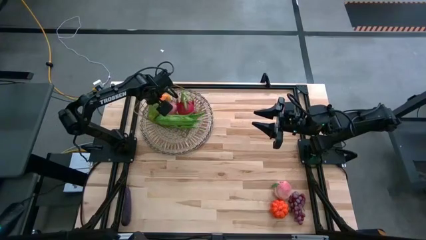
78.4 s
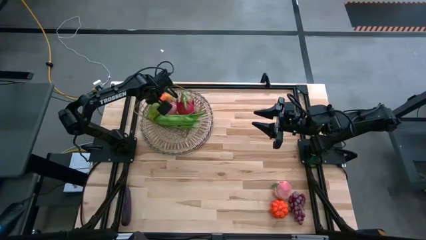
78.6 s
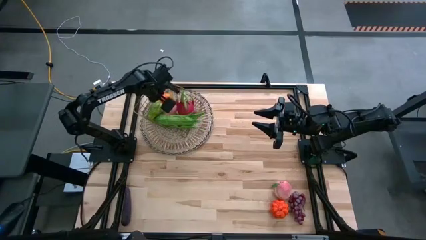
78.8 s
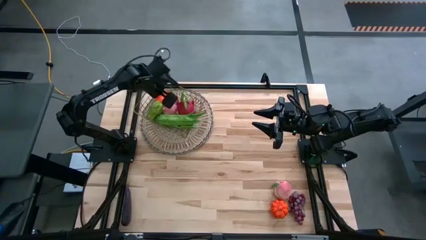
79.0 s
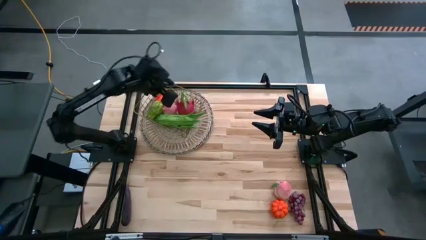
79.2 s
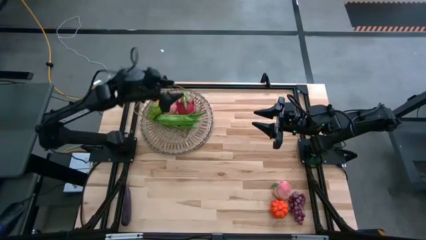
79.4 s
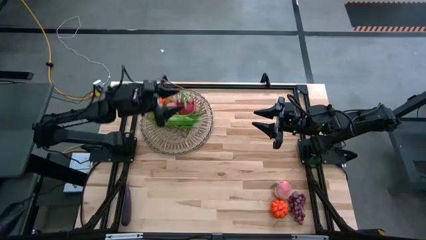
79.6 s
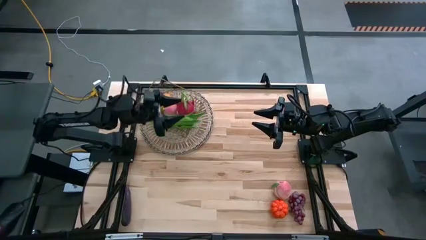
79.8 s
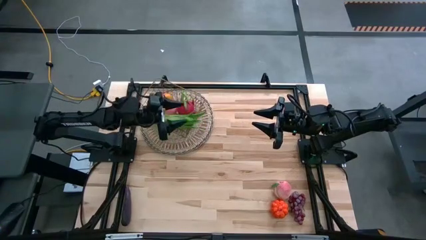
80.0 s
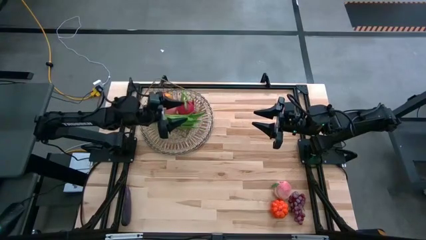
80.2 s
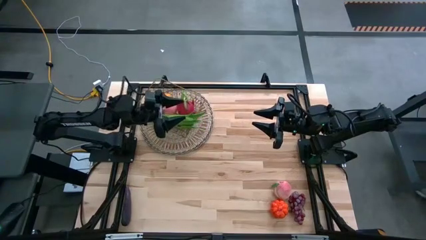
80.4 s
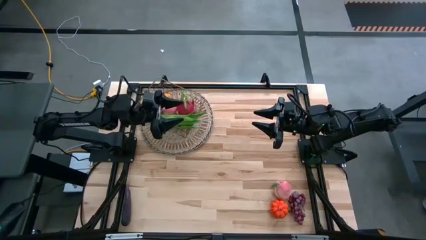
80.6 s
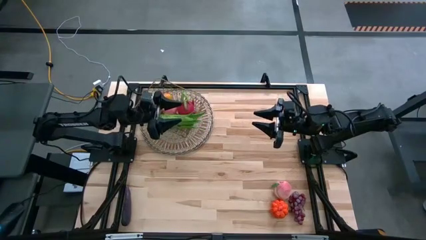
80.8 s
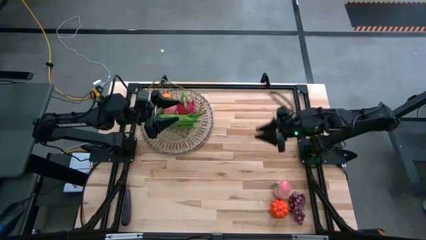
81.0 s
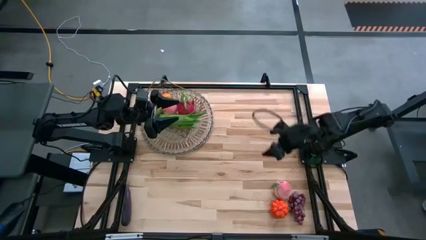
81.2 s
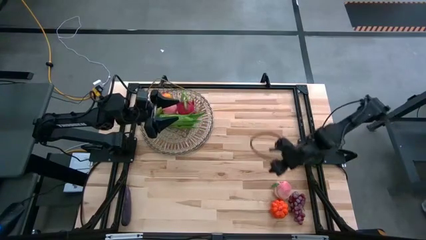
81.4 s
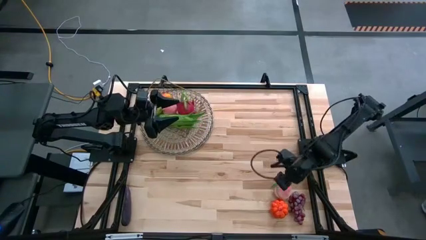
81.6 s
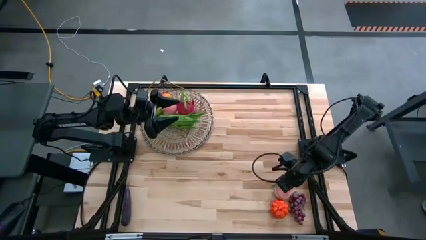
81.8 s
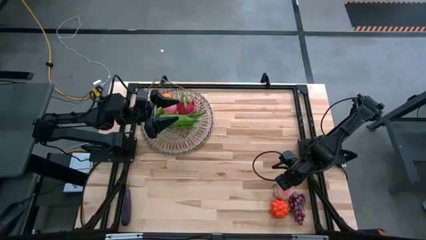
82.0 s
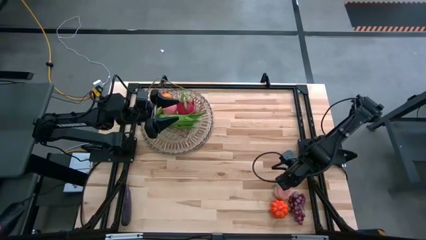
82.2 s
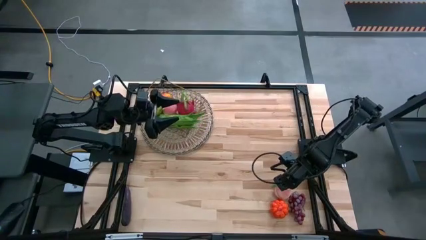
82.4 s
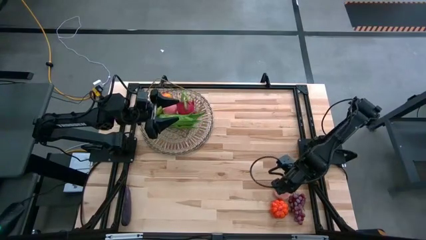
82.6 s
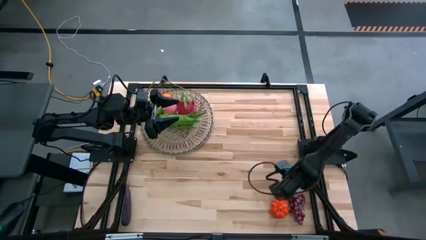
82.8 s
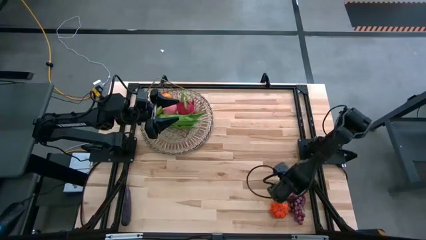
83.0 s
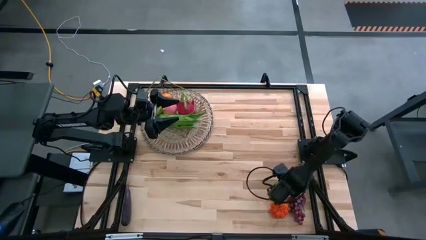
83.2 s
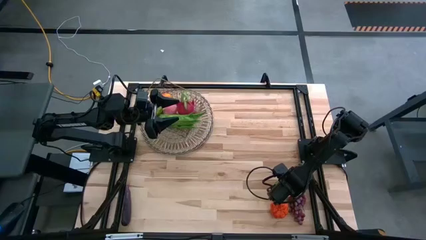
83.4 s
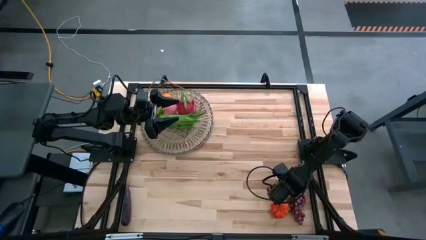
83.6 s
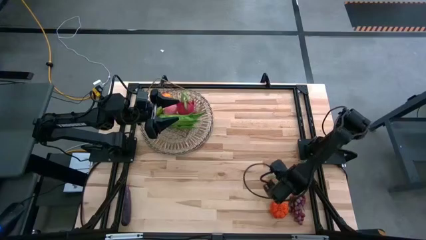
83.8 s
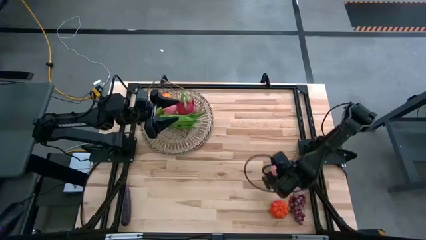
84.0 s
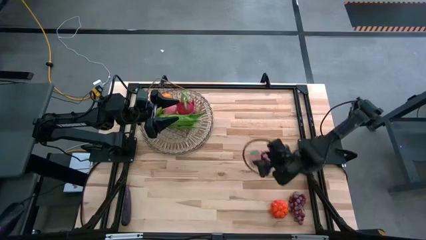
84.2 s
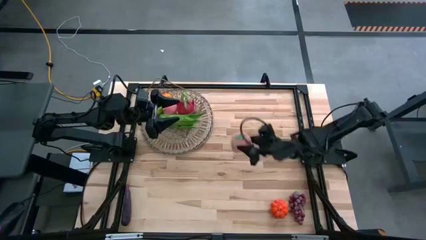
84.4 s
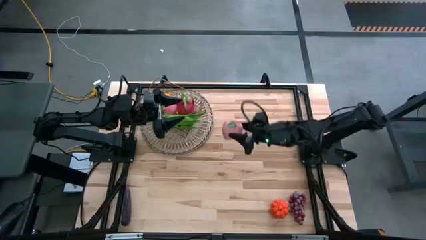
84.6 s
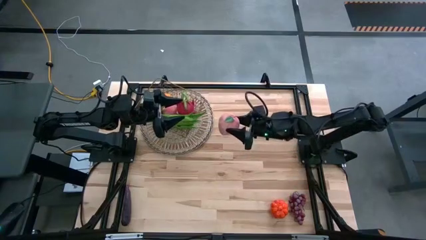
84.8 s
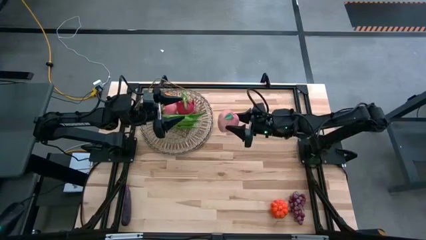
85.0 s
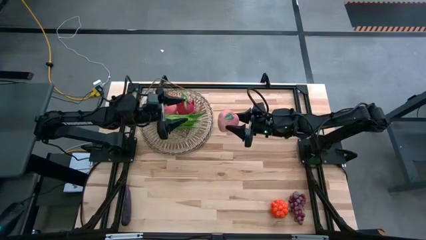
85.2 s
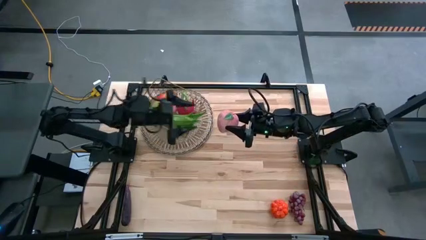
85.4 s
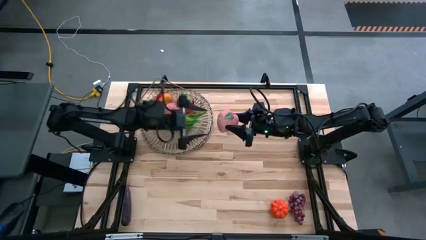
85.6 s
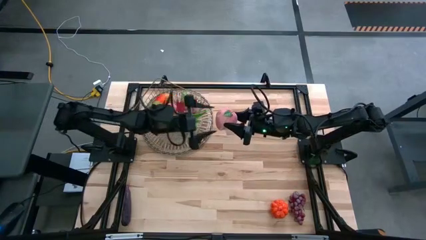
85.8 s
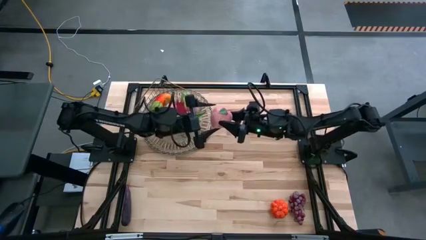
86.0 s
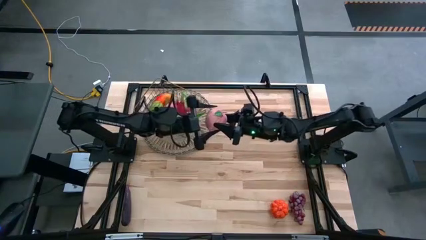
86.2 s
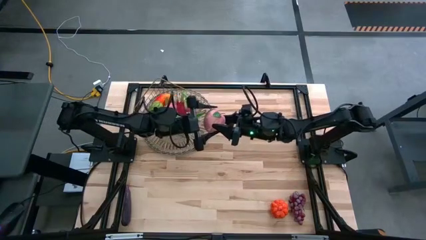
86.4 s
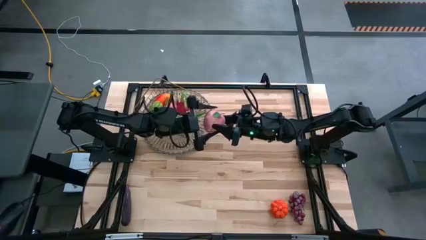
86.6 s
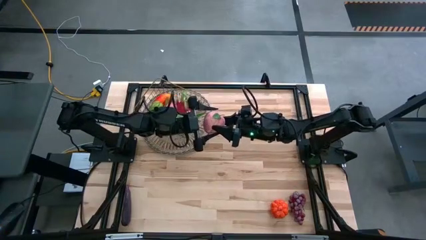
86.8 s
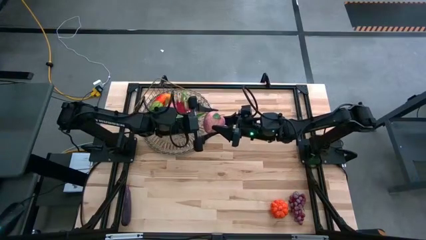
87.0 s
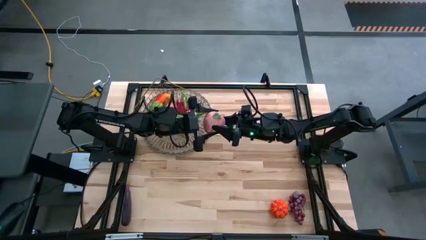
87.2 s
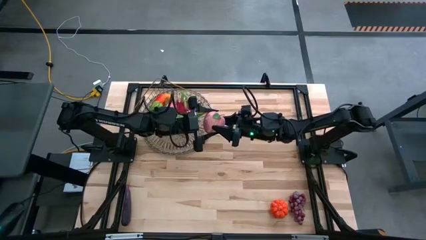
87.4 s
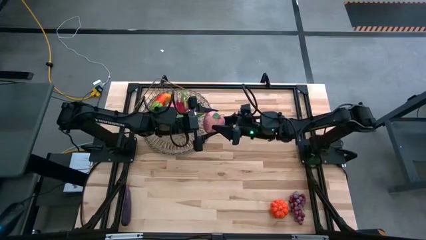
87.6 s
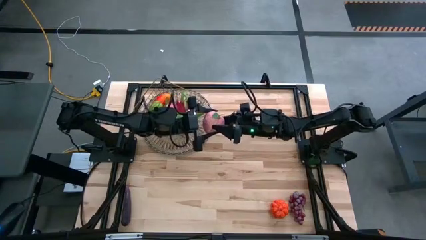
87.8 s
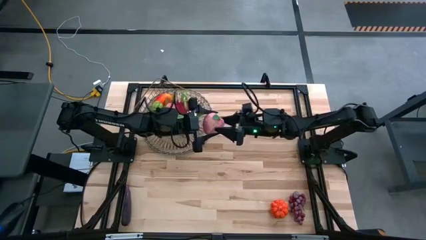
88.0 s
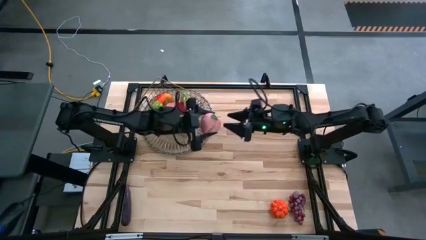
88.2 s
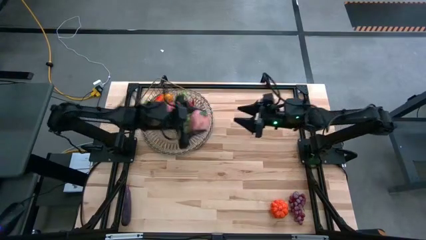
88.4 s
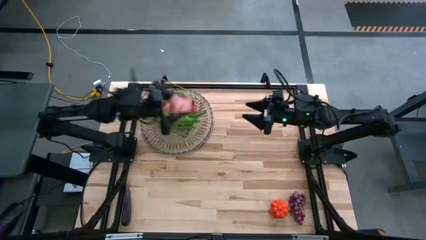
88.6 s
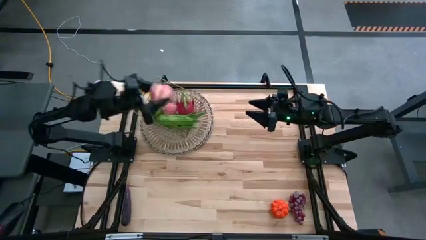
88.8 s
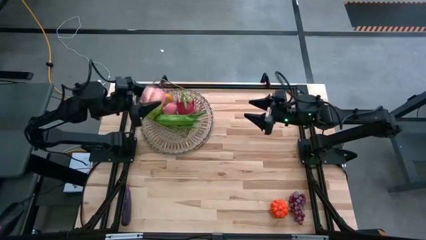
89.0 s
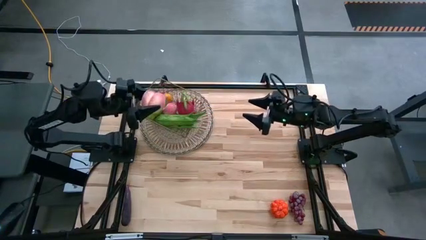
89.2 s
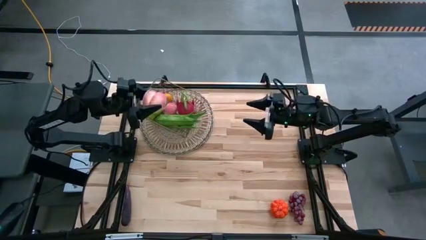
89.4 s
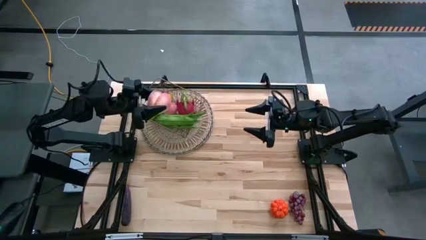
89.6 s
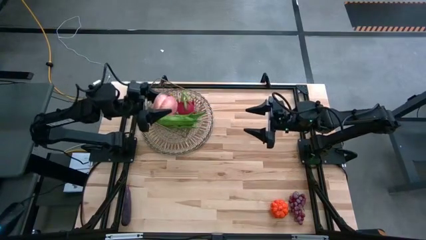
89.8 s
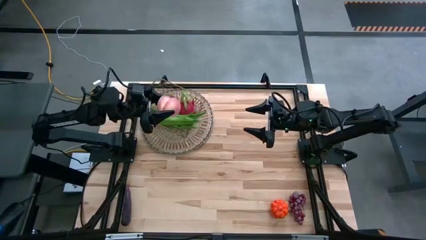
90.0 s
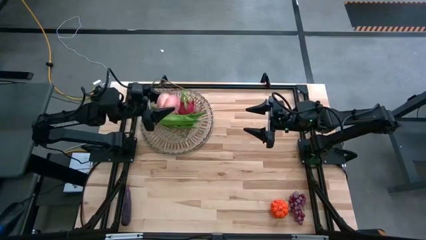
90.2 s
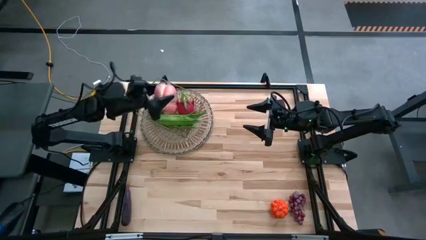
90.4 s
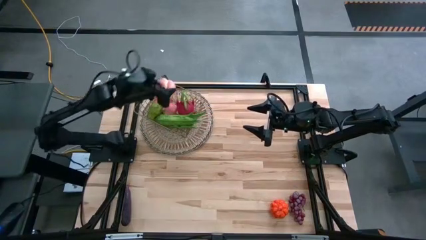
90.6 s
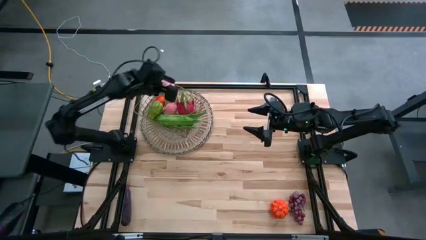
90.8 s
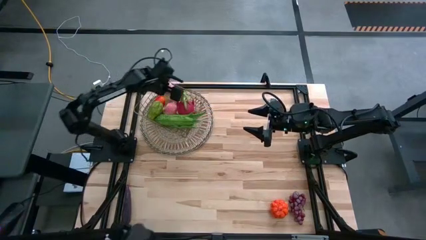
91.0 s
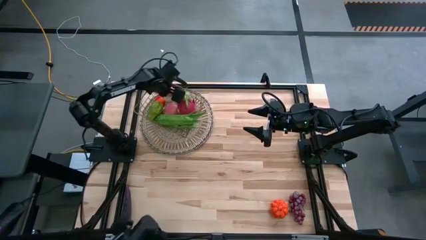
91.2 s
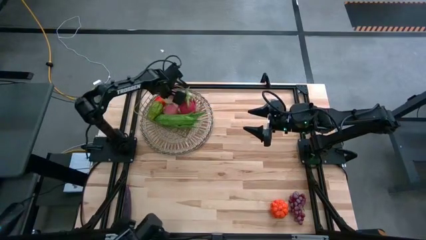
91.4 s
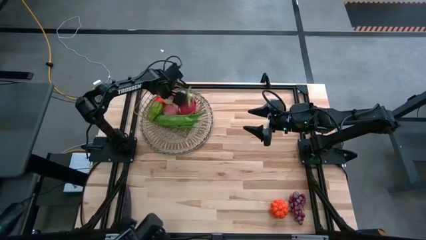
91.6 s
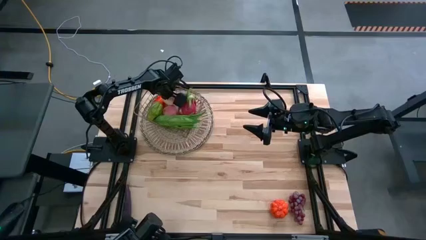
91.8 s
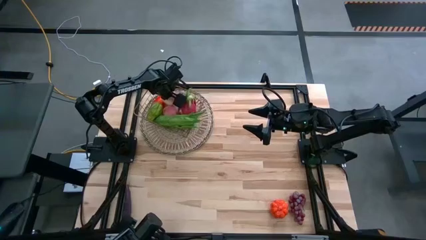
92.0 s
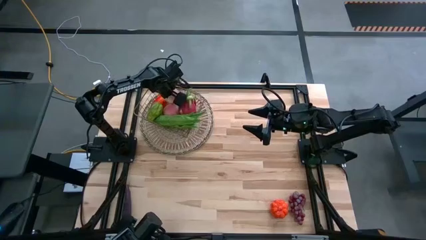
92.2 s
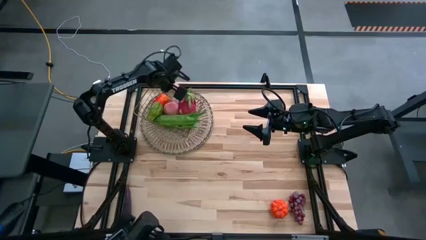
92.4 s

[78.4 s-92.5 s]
Task: Build produce basket
Put the peach into the wire basket

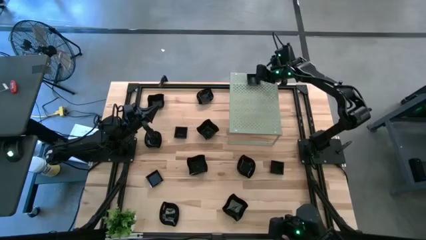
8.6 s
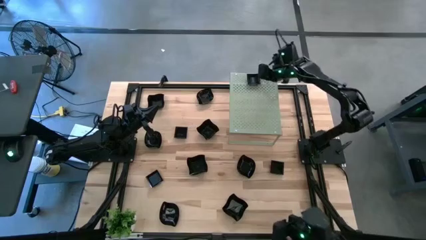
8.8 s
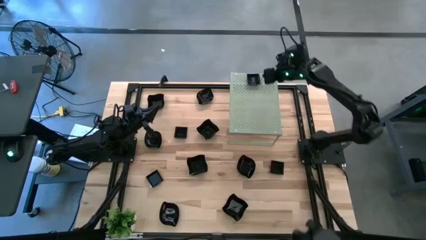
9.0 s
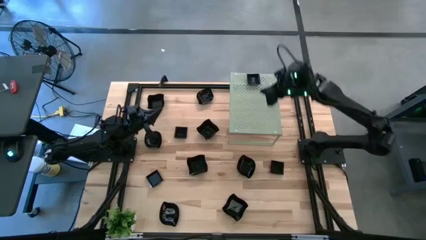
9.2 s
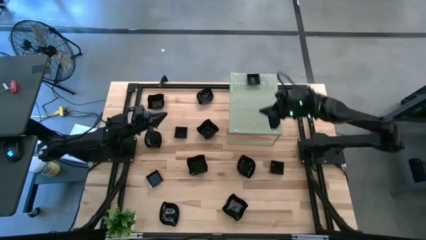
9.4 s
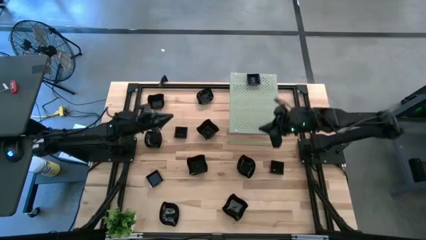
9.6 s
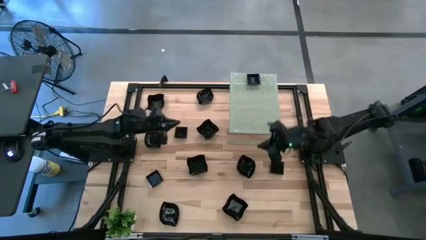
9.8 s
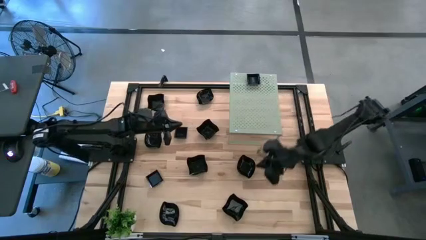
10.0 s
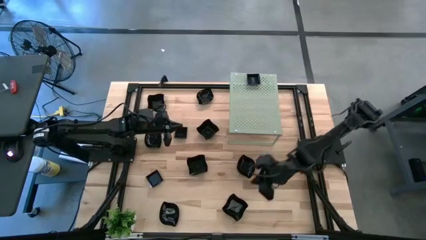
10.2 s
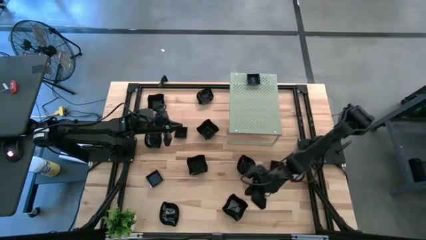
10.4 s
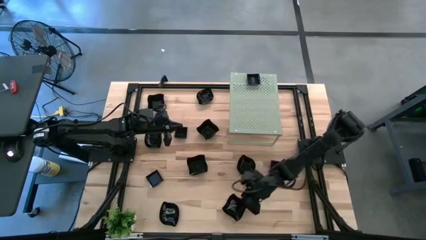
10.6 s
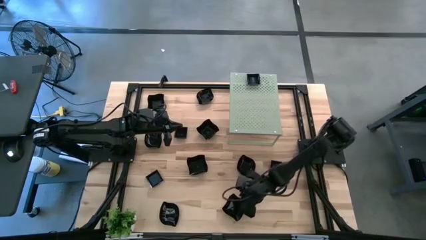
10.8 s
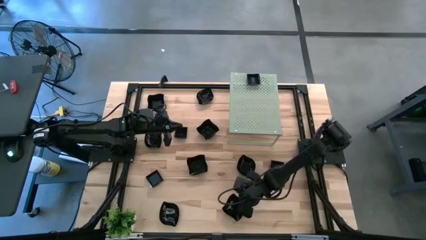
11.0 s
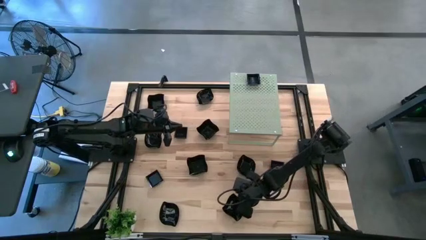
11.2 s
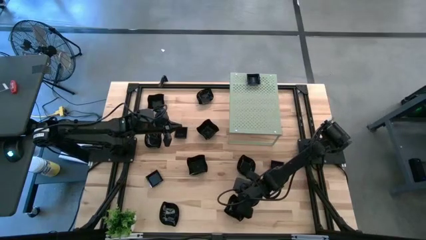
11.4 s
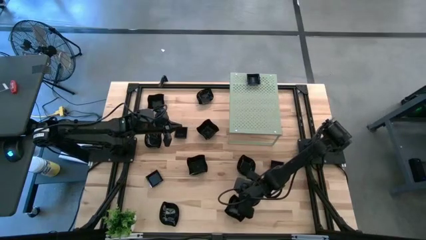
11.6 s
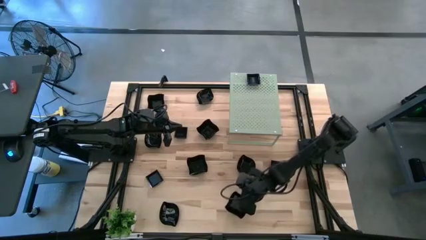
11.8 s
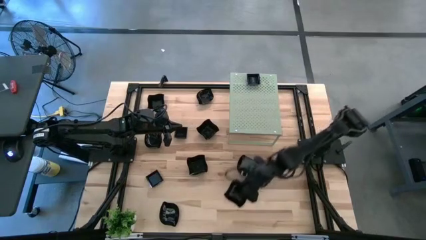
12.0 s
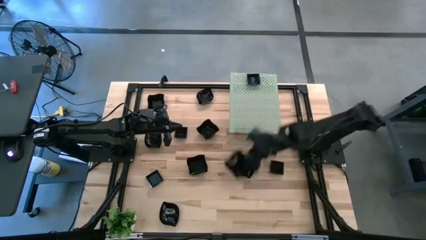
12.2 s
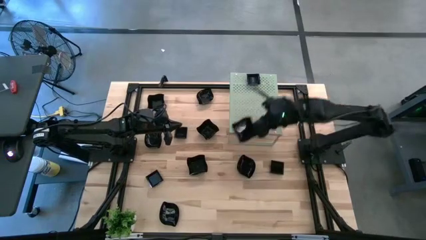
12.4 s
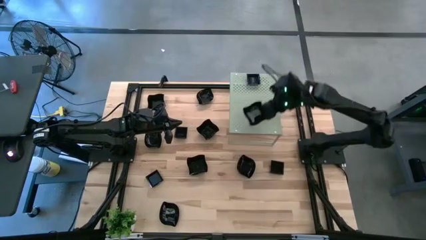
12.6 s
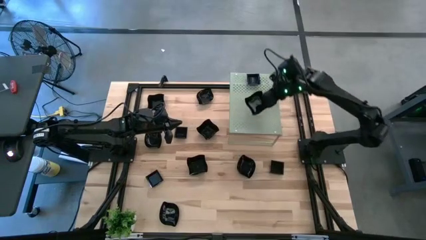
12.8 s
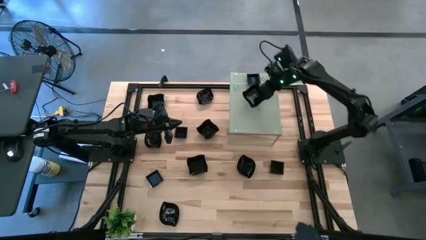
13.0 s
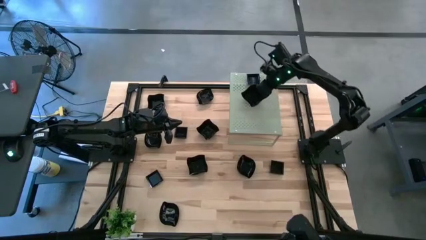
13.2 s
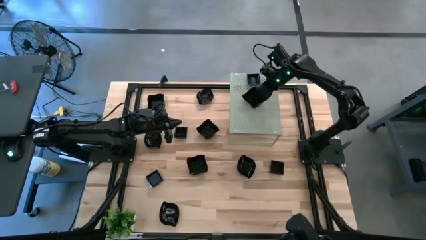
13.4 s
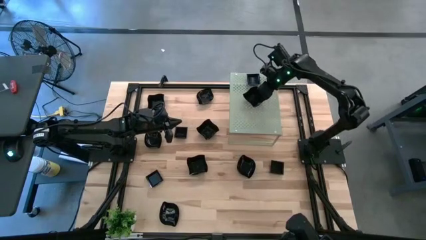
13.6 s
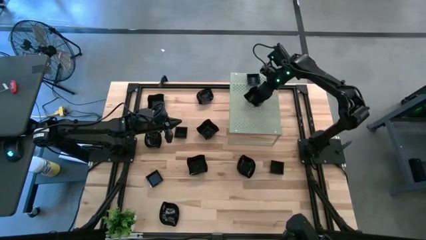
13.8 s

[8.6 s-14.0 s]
Task: Pick & Place Mini shaped plates
Put the black distorted square plate on the shelf
